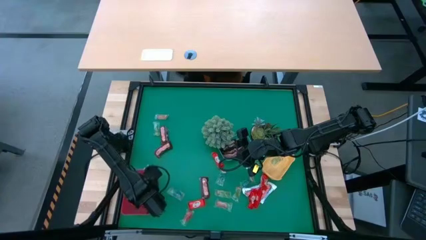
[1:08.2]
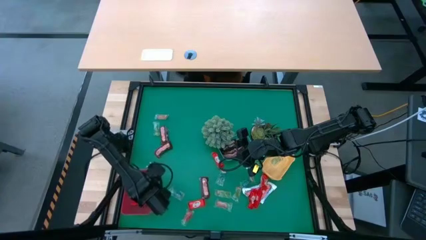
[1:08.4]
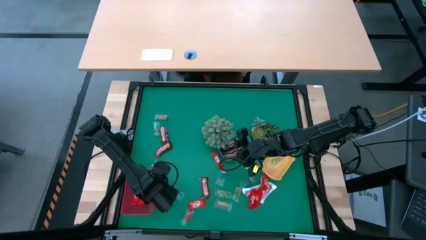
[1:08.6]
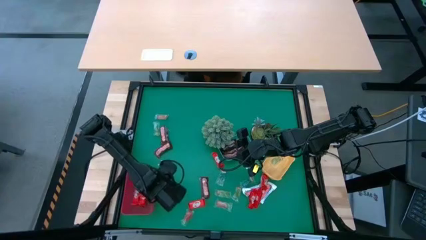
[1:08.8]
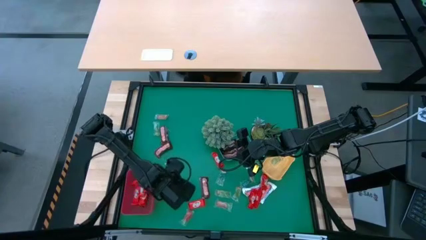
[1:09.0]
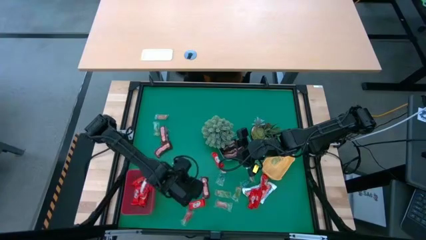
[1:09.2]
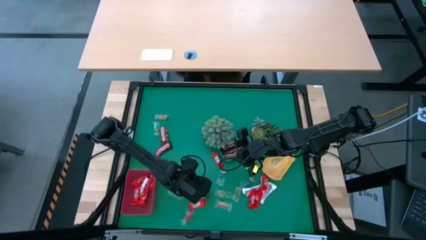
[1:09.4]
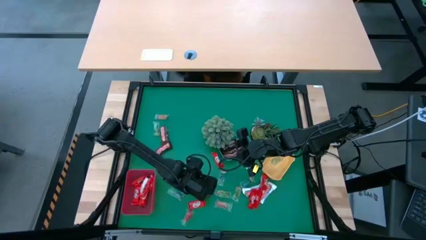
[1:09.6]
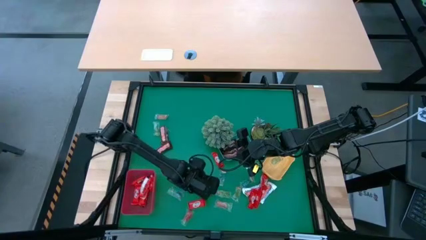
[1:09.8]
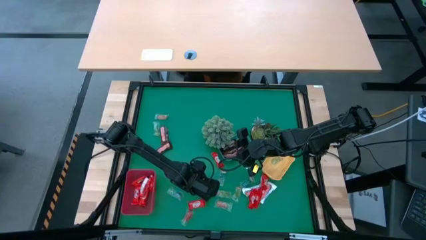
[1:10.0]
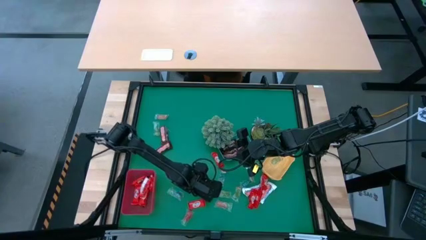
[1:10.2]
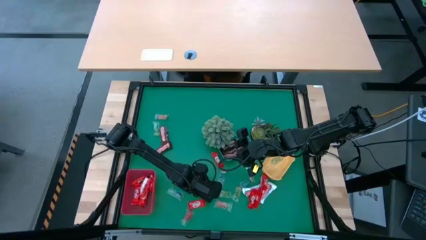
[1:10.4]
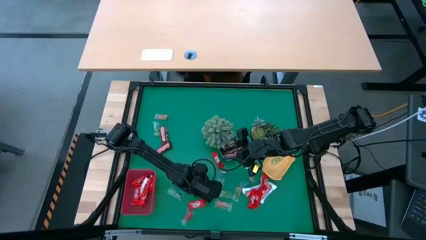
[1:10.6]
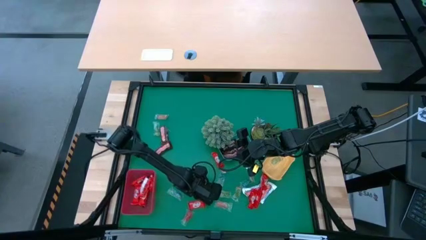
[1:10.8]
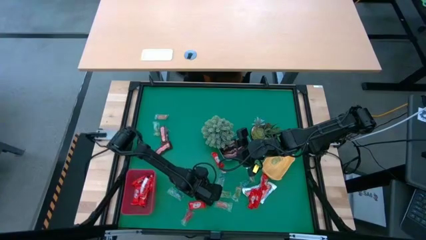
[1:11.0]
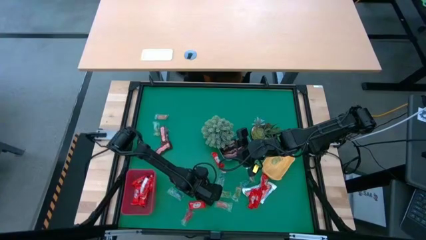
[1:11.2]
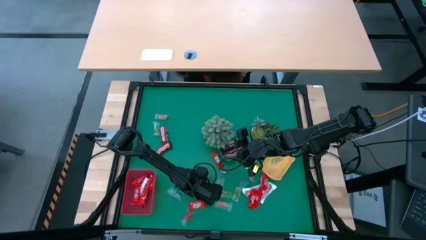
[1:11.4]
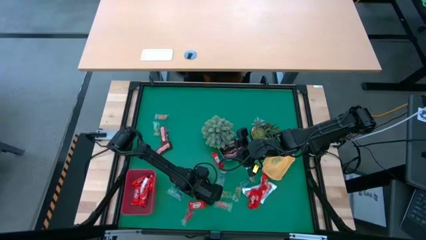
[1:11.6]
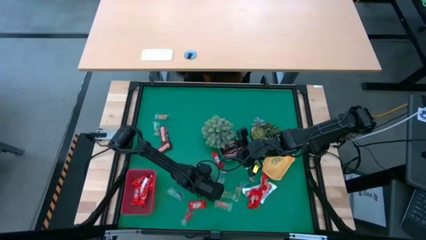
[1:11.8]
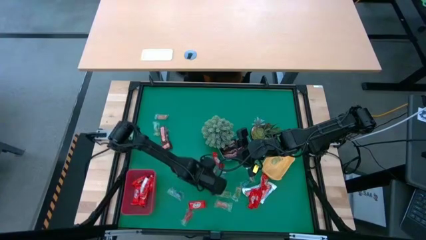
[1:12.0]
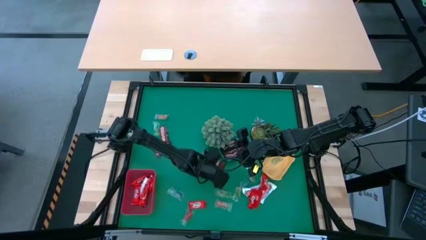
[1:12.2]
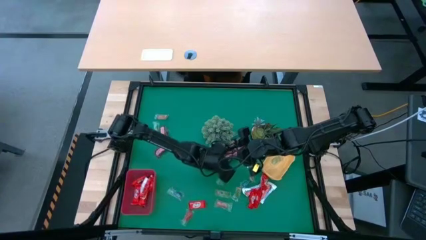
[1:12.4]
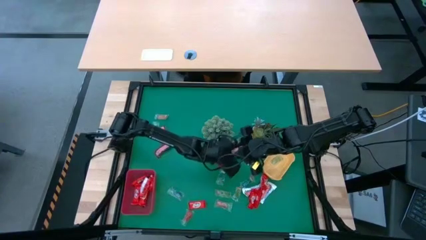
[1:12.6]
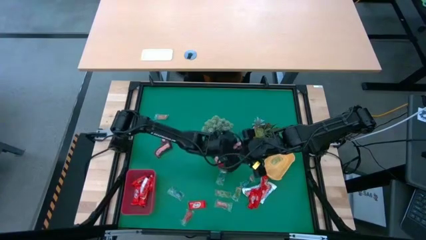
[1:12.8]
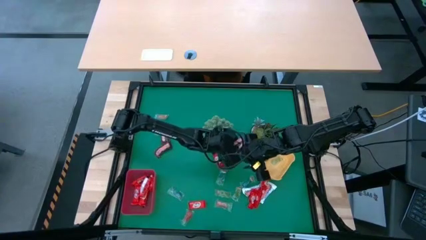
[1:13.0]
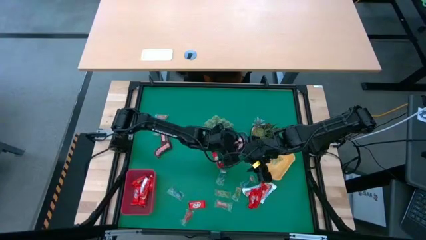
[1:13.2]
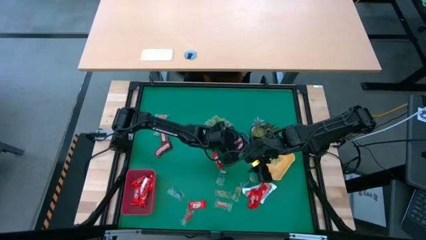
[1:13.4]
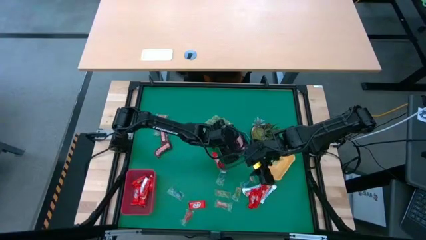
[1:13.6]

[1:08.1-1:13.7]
Task: Organize candy in baskets
Put the brown chocolate into the blue bin

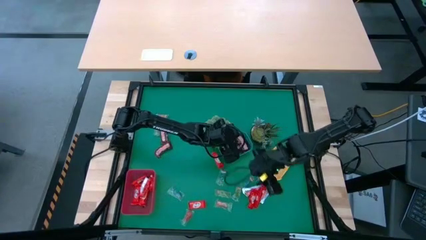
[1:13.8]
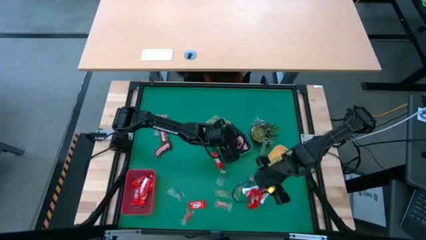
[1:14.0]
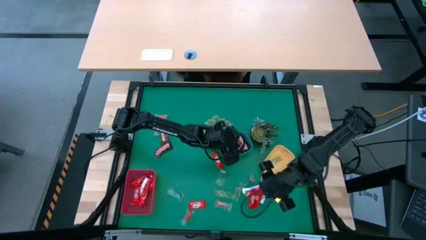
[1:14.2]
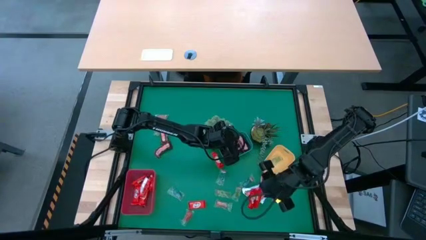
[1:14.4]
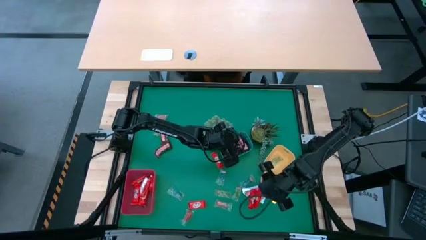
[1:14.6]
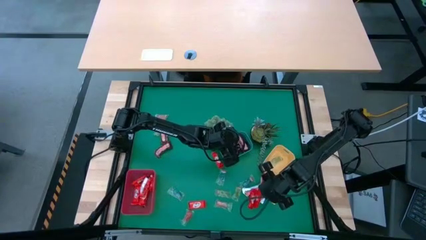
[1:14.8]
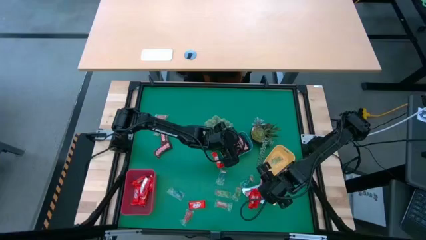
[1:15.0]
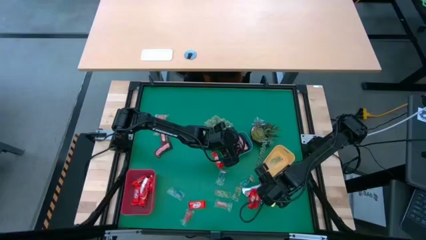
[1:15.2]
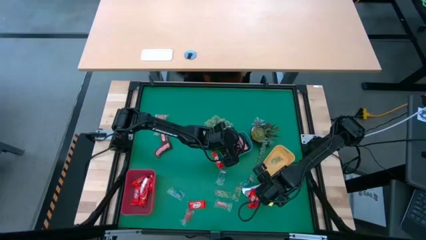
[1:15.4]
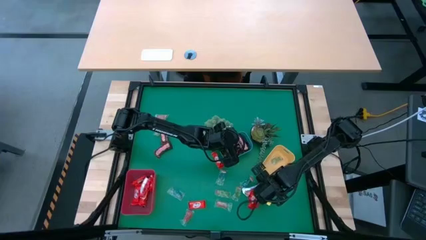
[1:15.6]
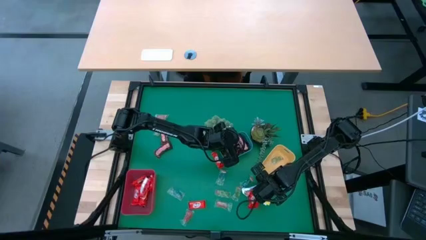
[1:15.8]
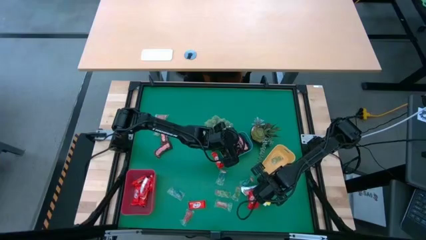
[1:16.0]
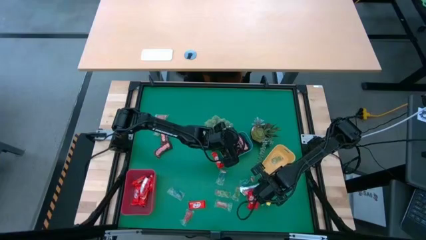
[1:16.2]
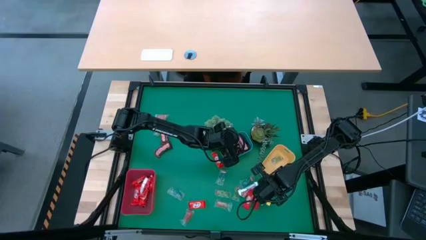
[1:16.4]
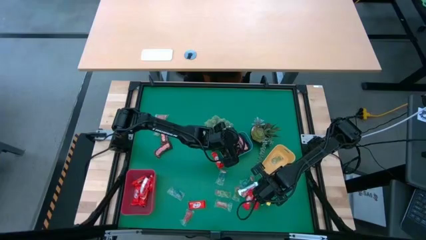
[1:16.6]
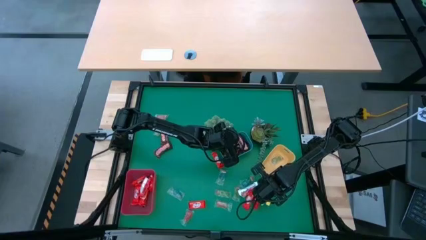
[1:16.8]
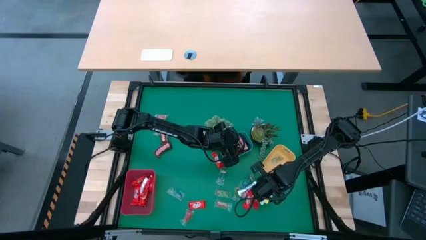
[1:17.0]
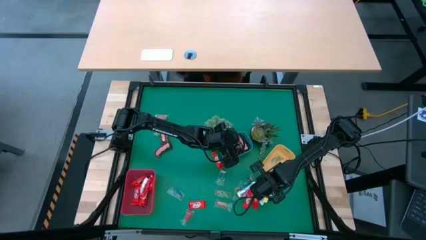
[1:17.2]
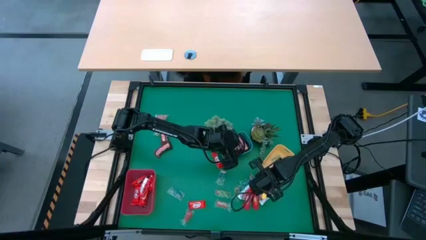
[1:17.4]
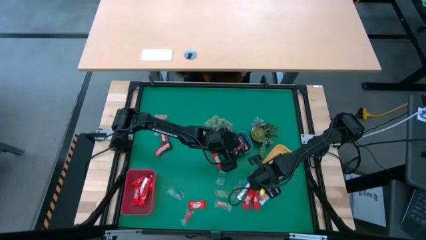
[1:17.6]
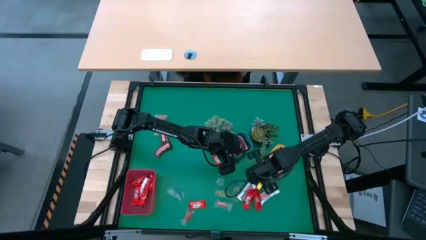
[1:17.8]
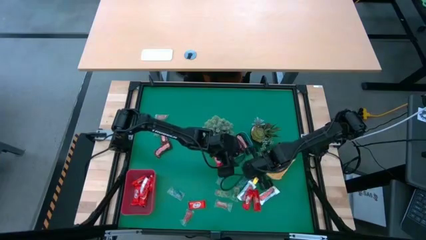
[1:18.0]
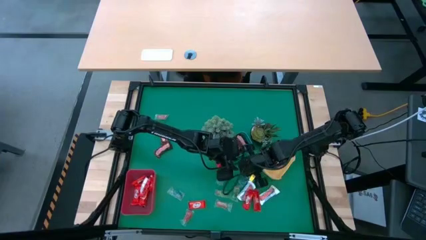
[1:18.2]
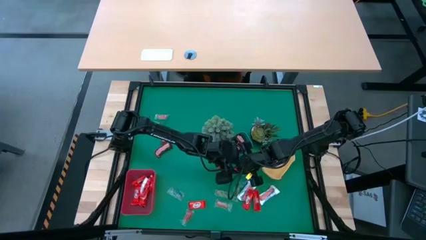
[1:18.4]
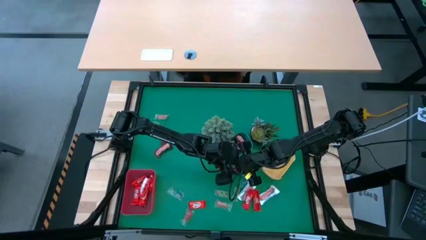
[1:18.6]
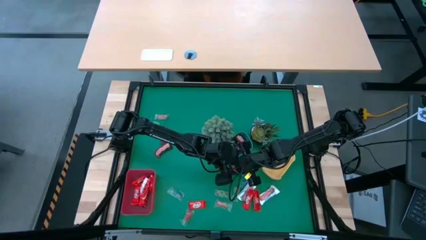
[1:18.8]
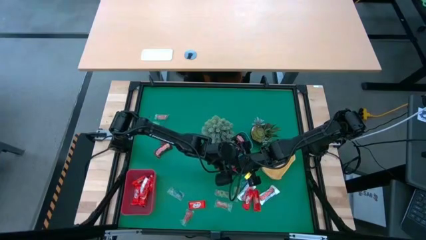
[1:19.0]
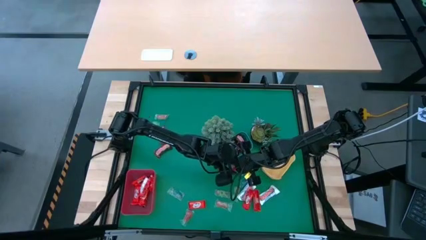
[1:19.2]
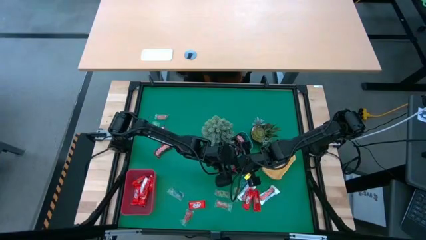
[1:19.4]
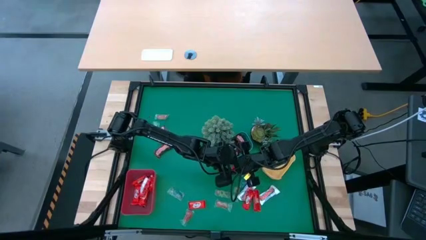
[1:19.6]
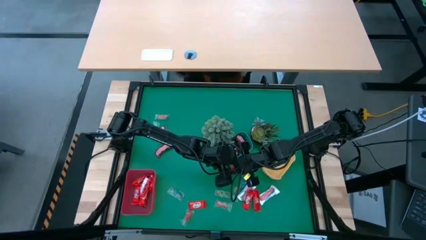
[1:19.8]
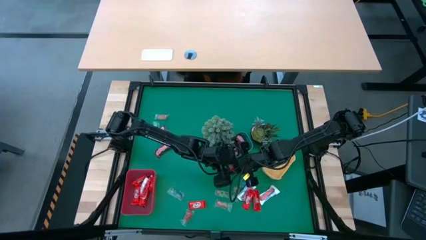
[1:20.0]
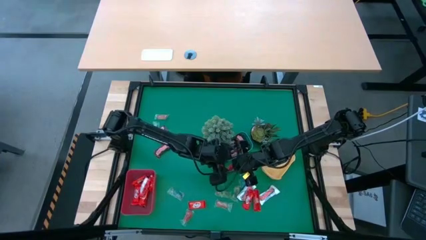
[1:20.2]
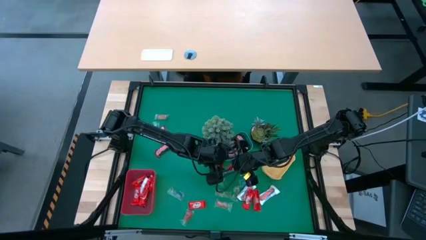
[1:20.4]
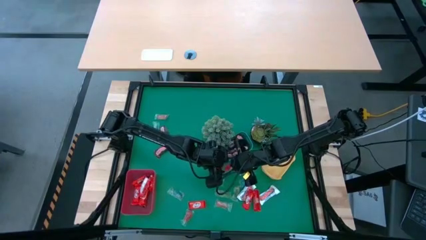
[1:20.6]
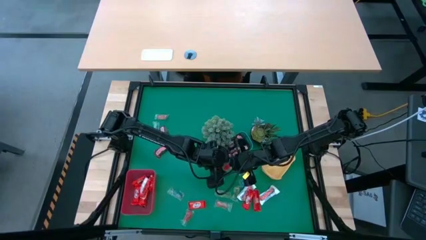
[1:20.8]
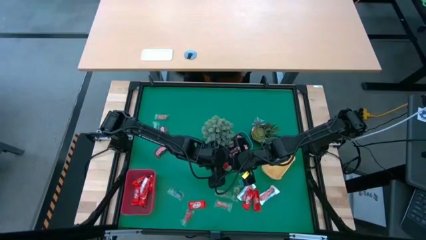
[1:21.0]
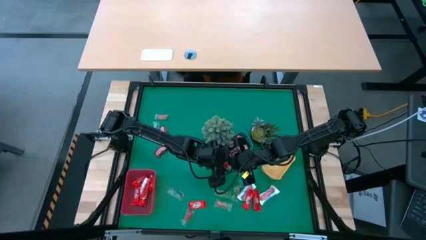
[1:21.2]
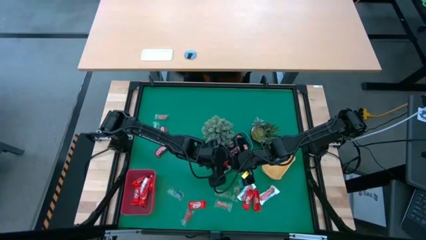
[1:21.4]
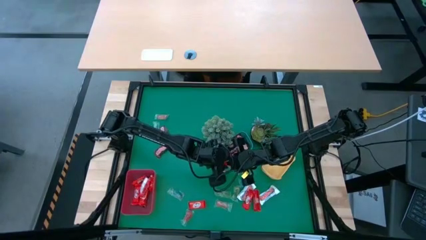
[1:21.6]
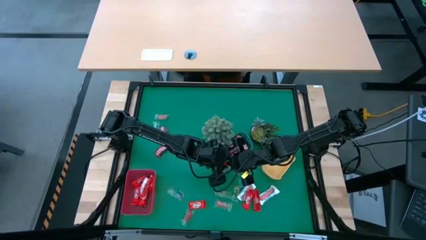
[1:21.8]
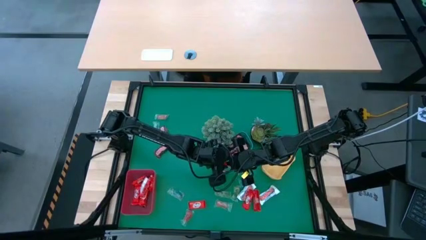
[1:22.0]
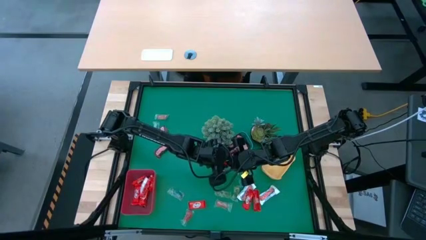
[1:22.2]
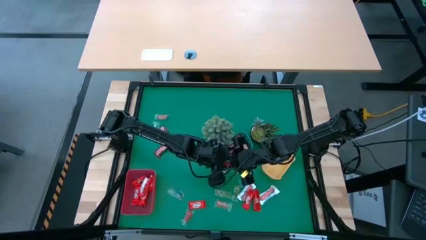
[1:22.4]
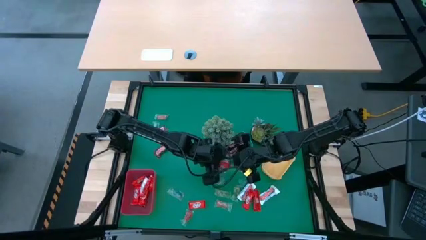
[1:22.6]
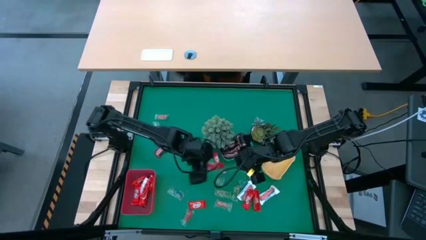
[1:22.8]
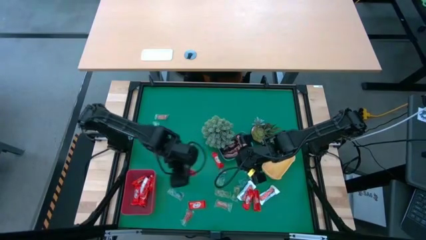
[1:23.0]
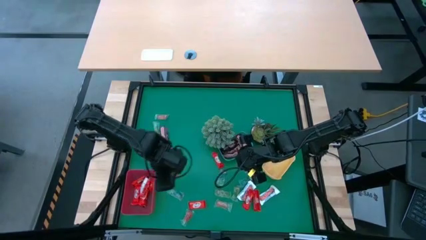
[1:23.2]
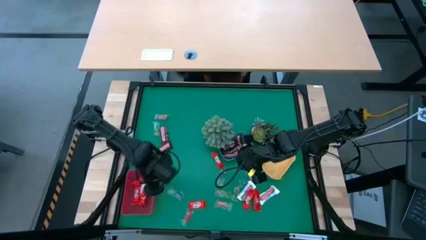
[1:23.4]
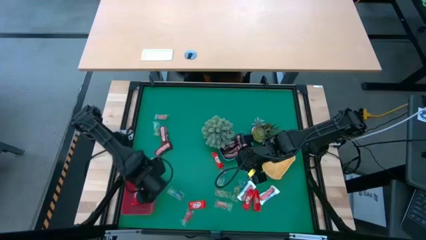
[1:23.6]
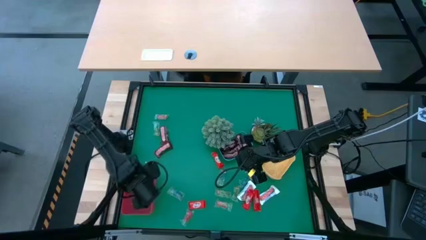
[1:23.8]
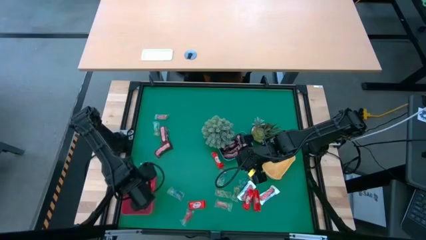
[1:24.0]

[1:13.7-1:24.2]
Put the red chocolate into the red bin
